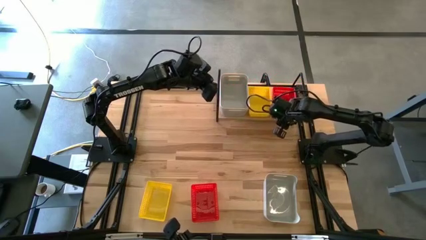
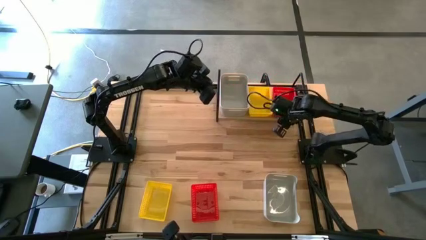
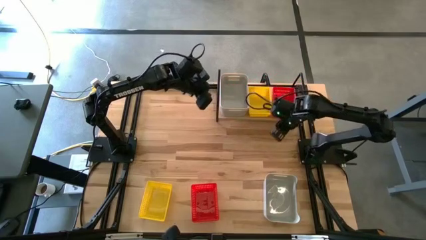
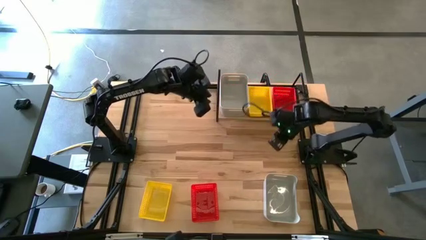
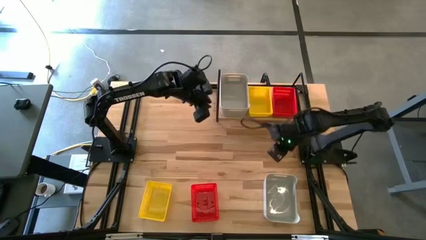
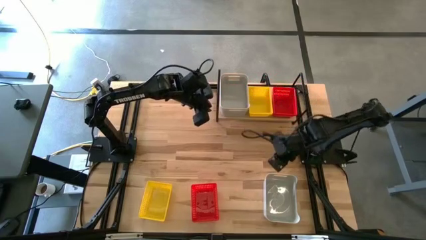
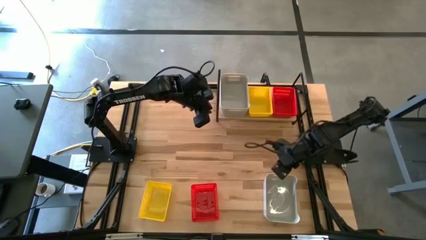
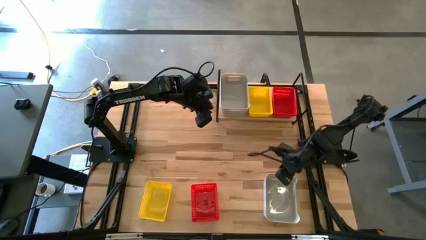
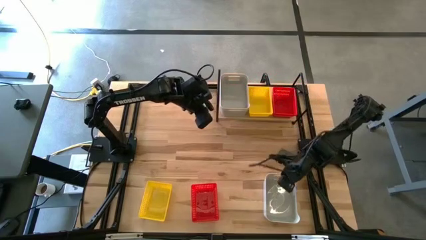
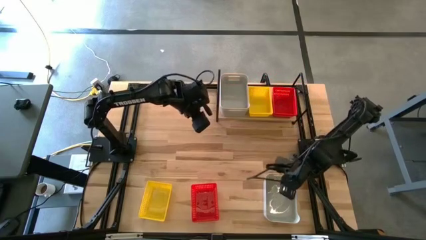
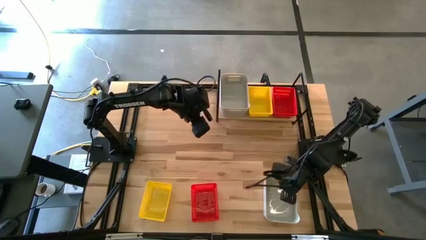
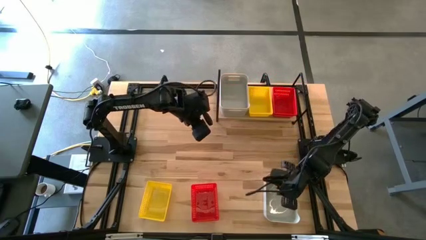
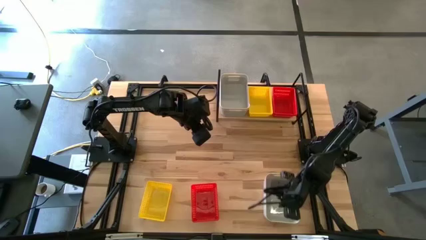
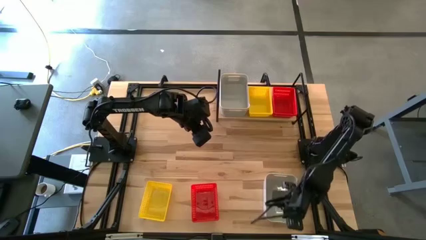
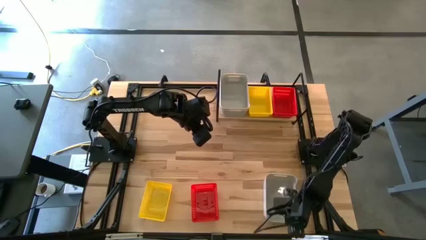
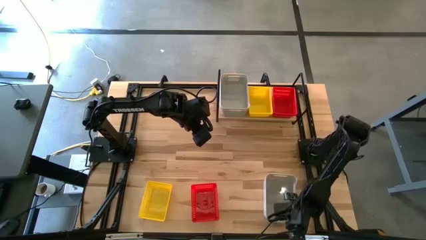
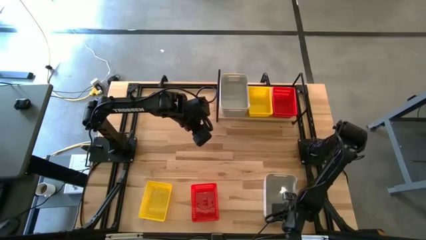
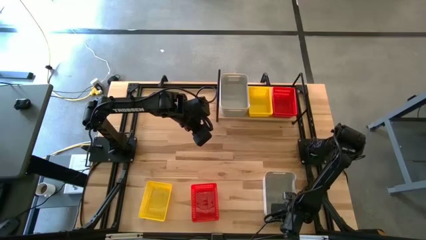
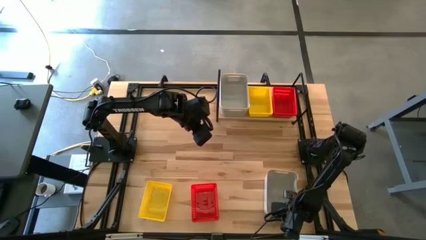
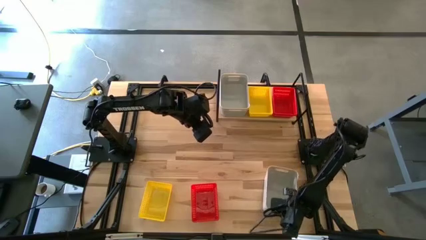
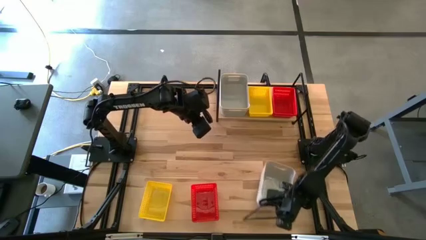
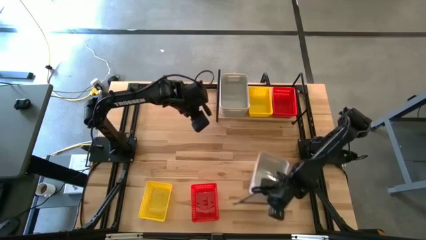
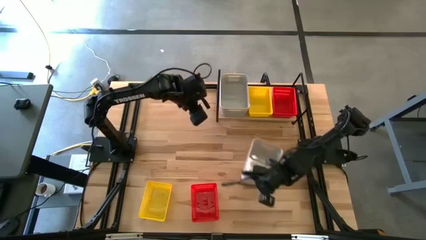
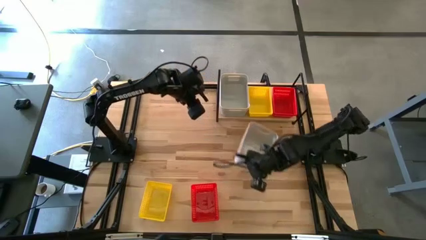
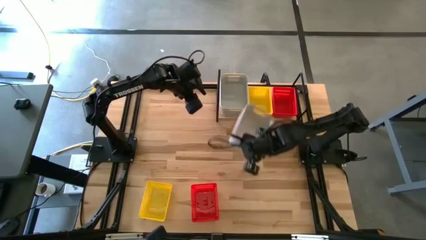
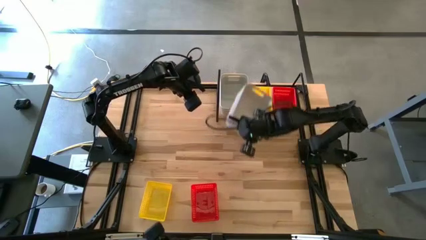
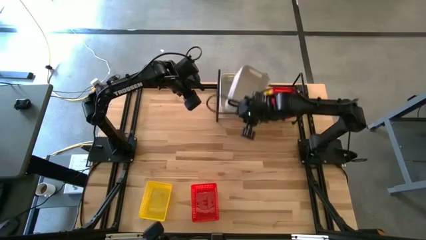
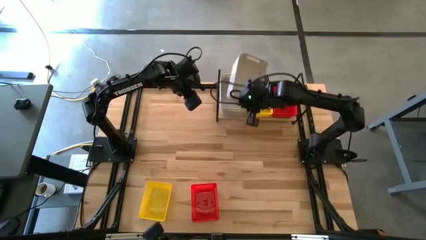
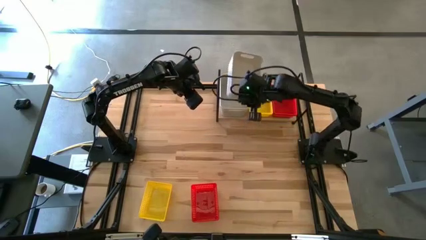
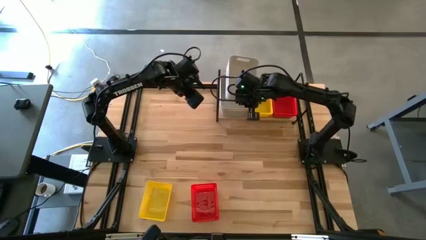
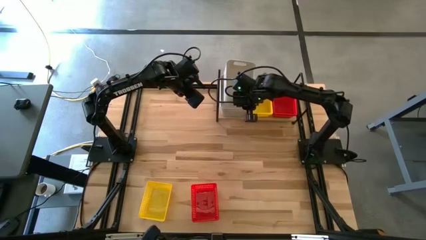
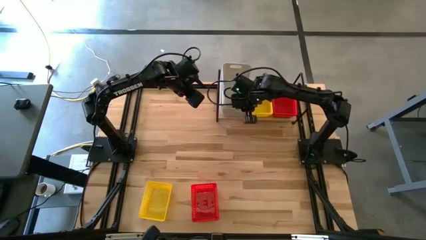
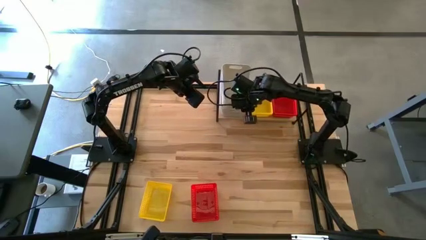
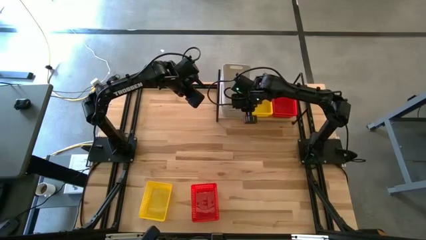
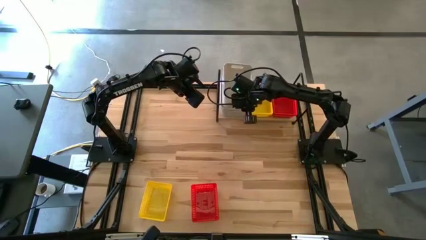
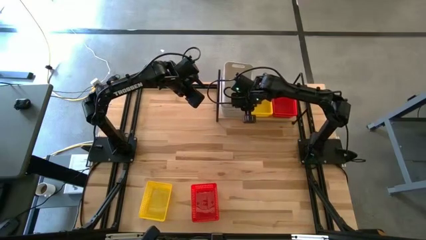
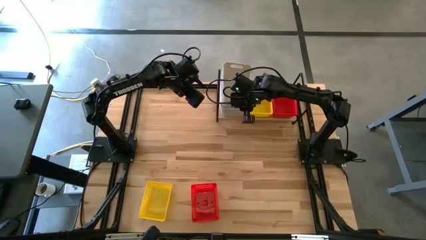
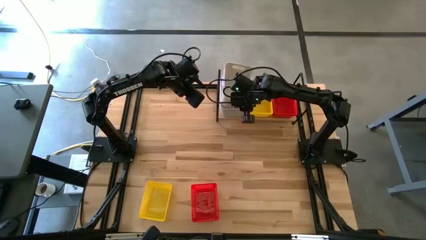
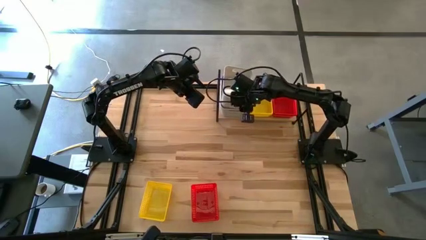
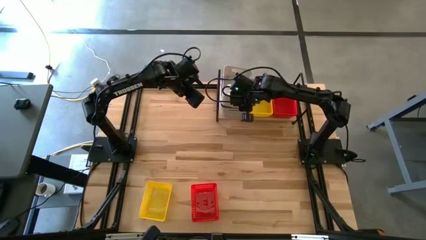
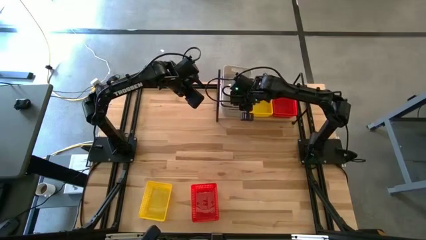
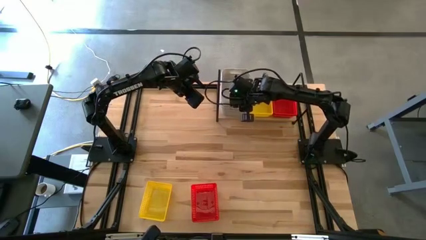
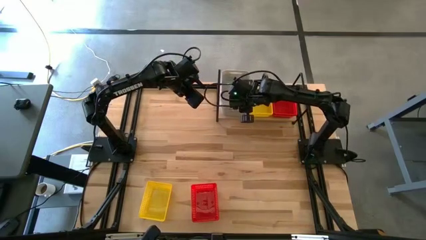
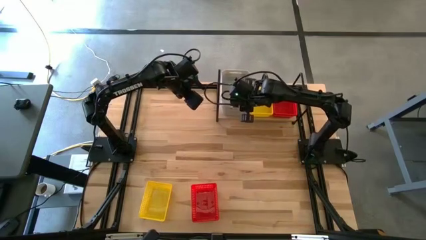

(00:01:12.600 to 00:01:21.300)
Task: Stack baskets on shelf by color
Stack the gray bin on top of the gray bin on the shelf

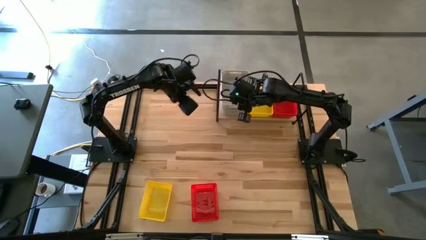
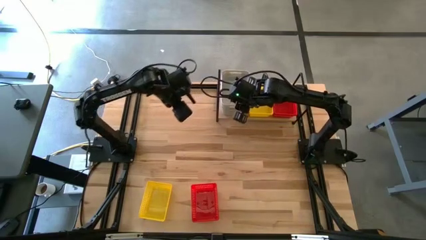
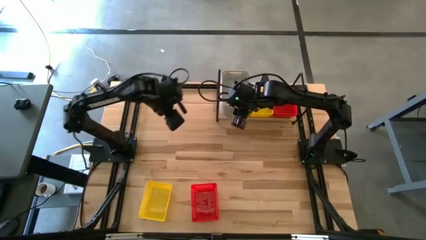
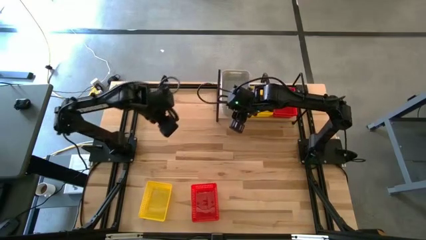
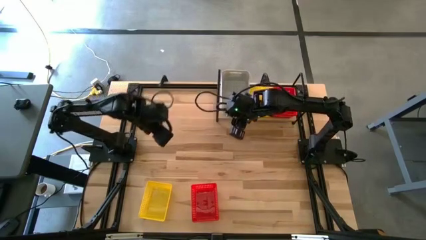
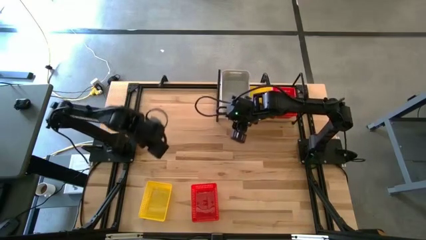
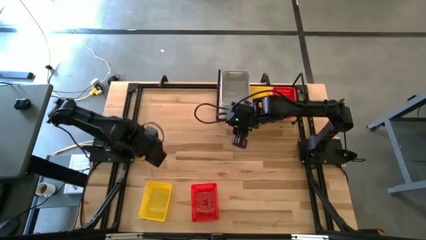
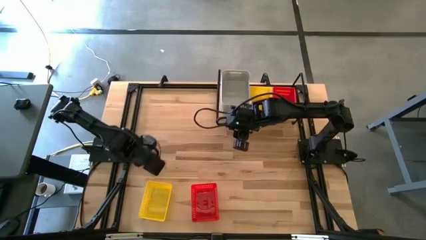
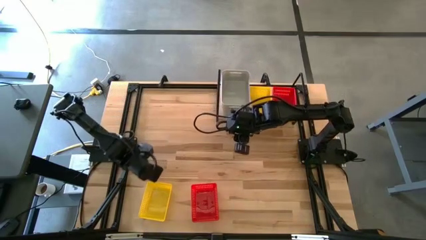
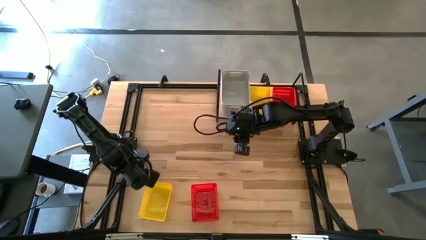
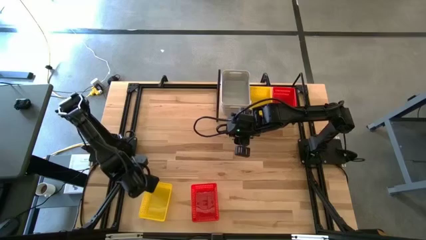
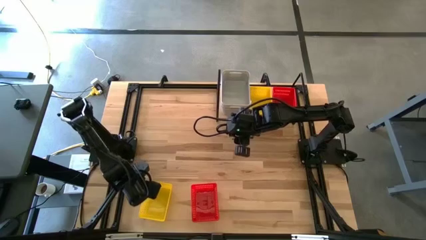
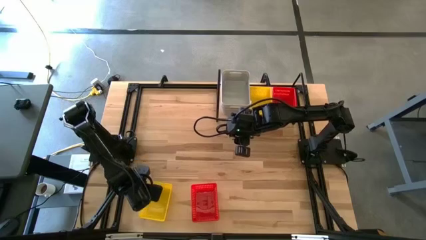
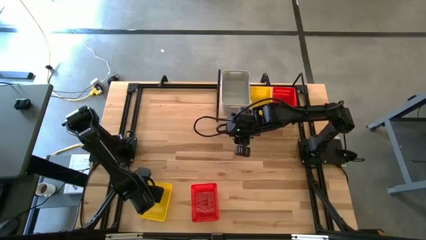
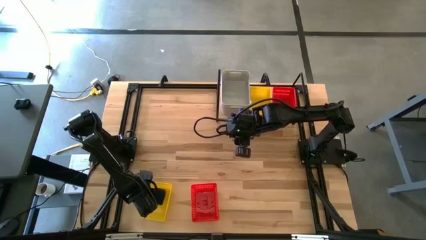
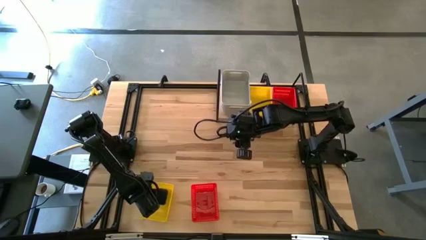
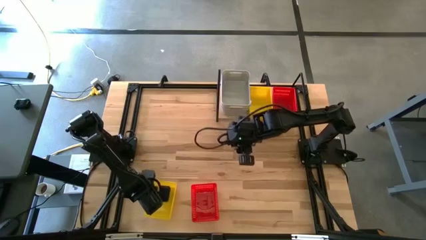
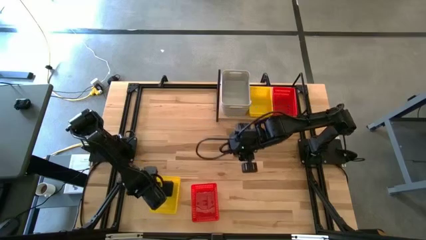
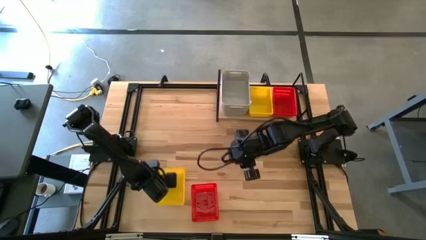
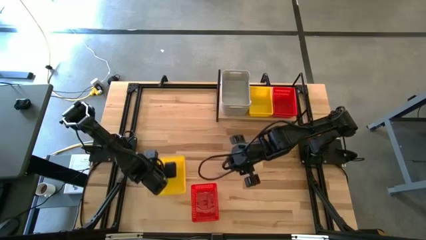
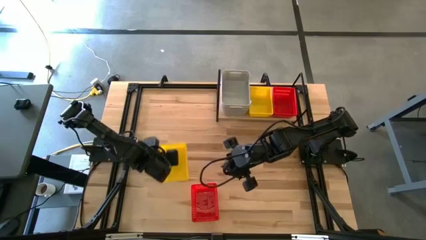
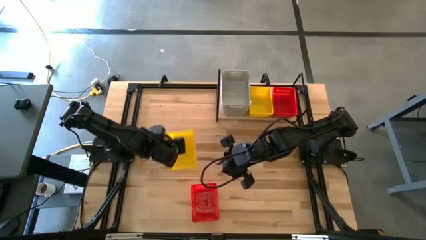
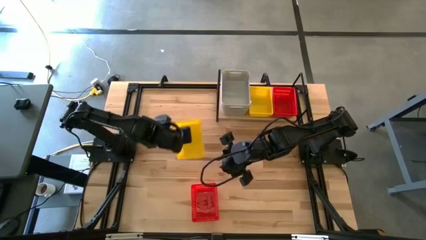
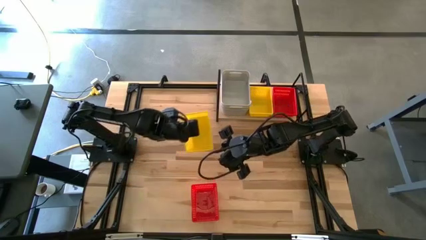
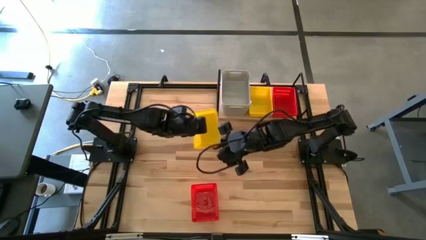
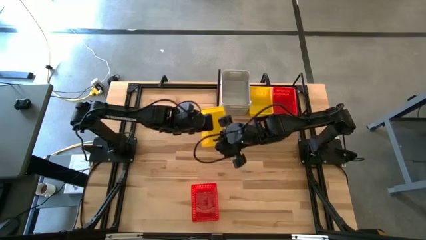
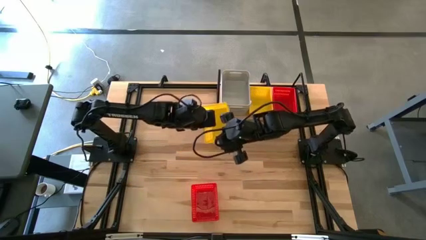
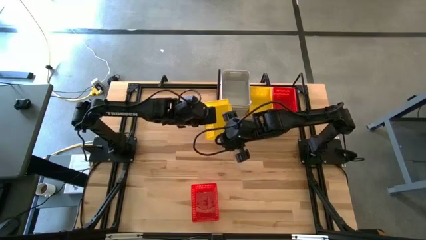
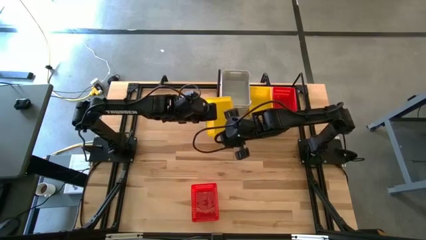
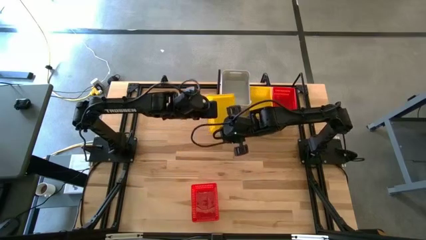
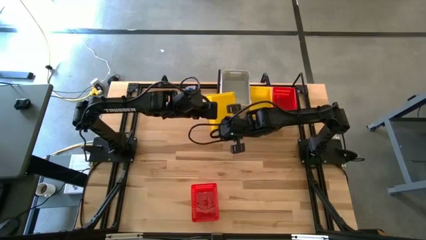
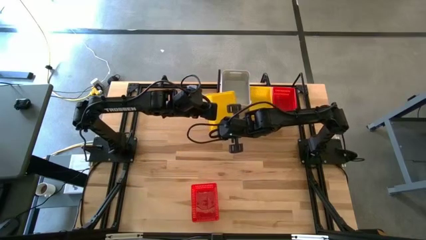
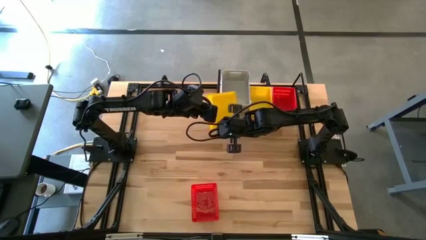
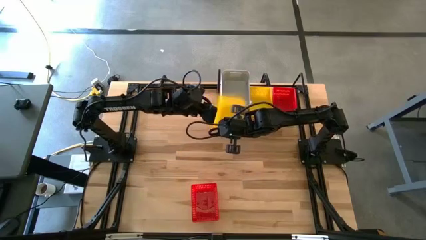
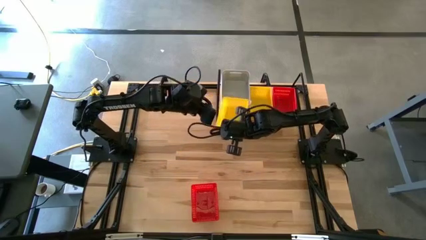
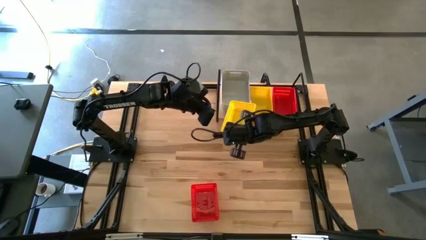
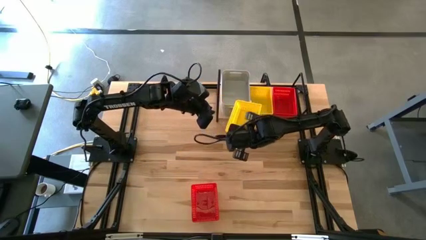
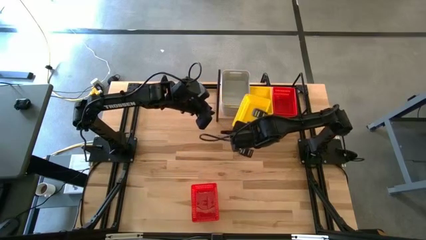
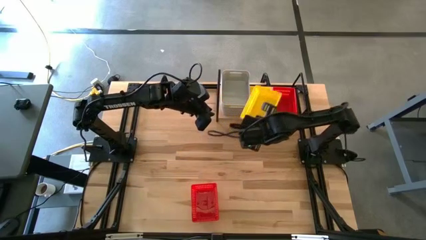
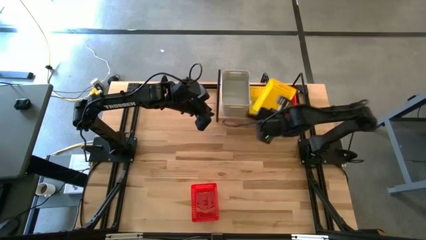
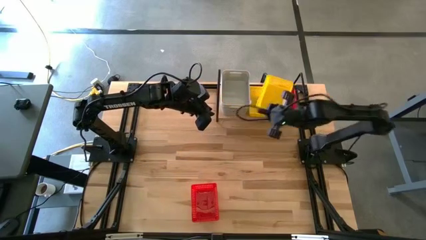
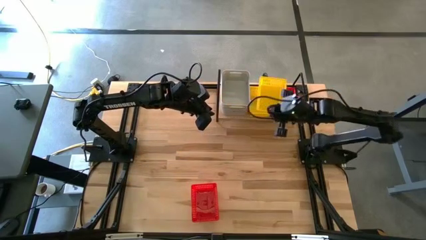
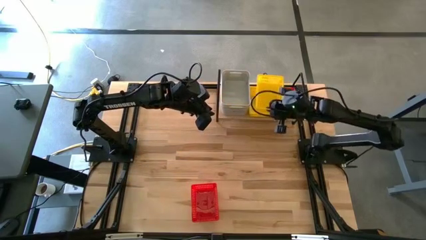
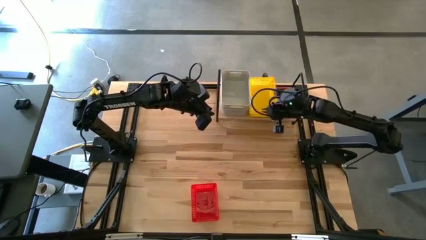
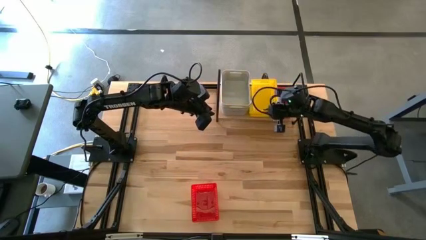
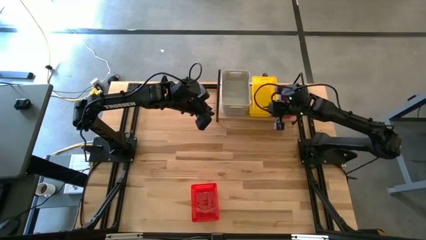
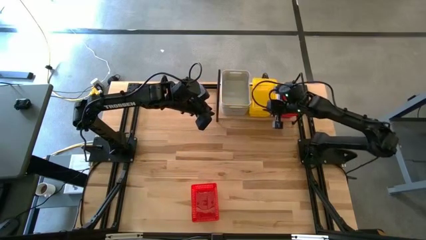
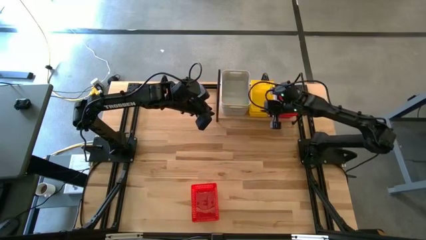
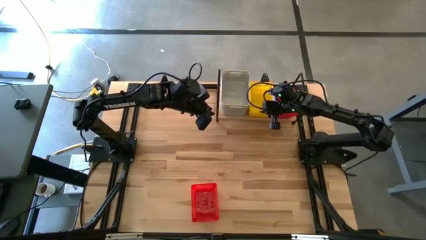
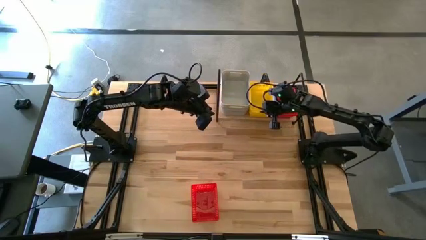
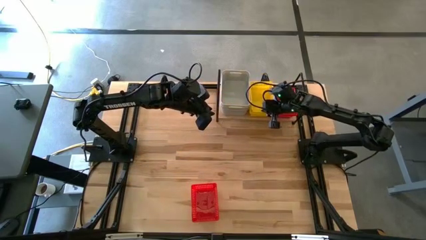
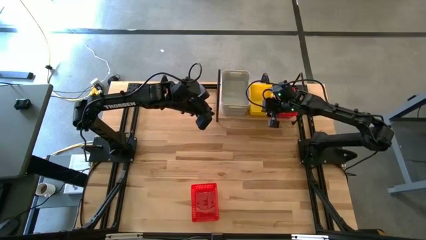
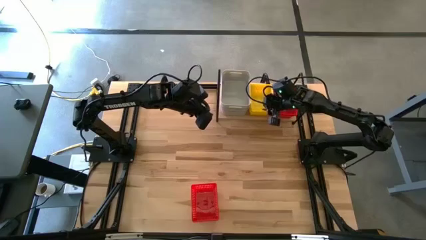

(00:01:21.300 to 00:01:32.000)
Stack the yellow bin on top of the yellow bins on the shelf
